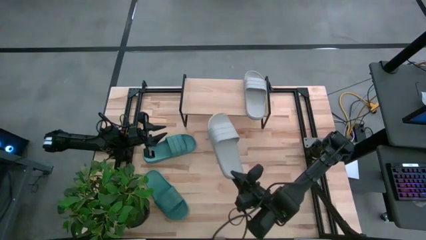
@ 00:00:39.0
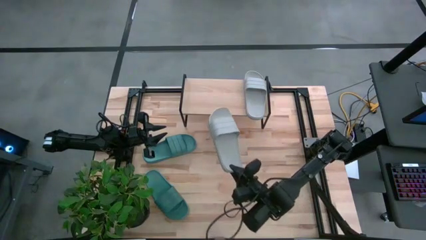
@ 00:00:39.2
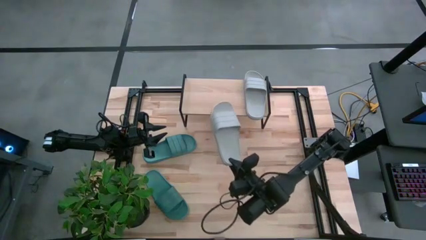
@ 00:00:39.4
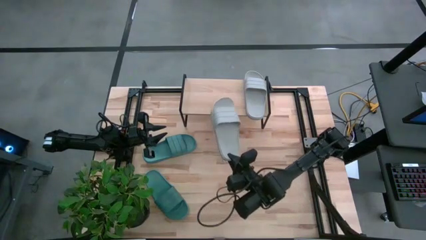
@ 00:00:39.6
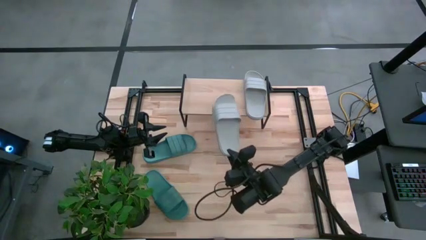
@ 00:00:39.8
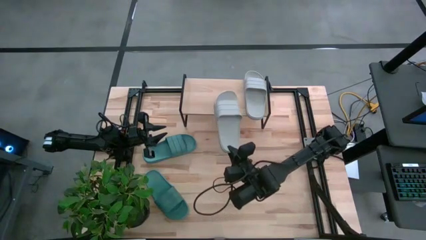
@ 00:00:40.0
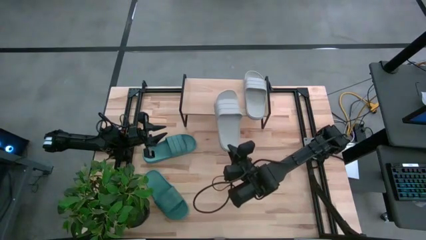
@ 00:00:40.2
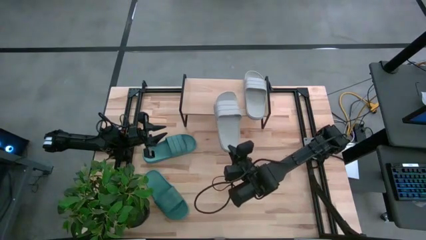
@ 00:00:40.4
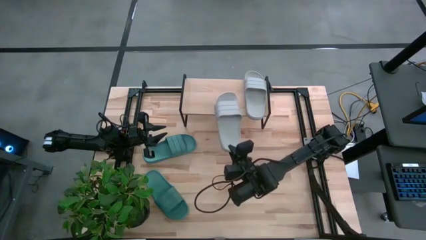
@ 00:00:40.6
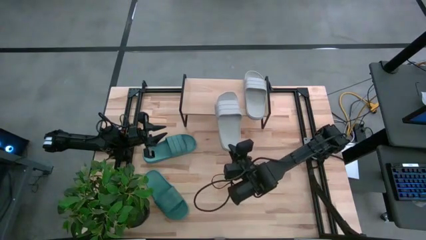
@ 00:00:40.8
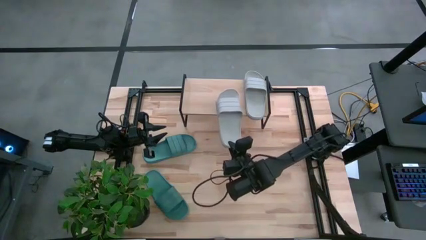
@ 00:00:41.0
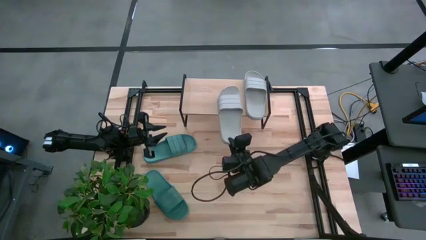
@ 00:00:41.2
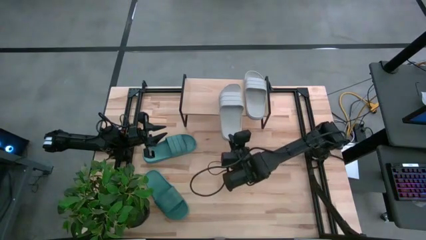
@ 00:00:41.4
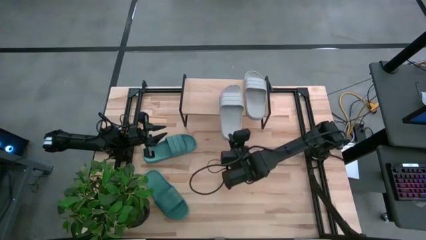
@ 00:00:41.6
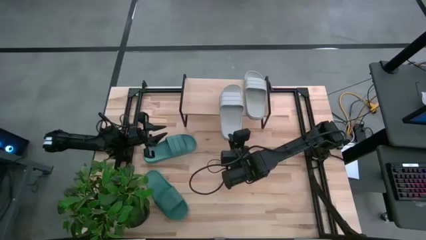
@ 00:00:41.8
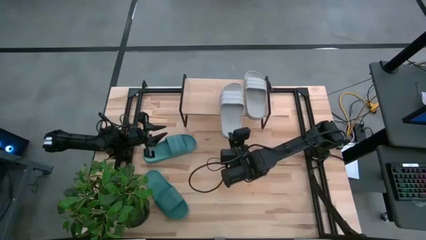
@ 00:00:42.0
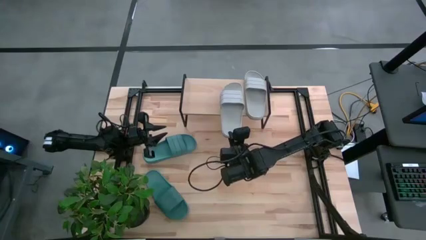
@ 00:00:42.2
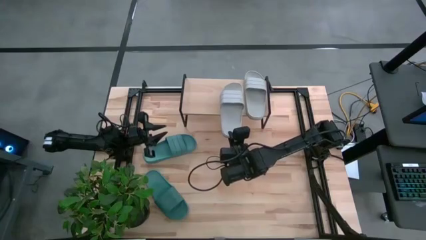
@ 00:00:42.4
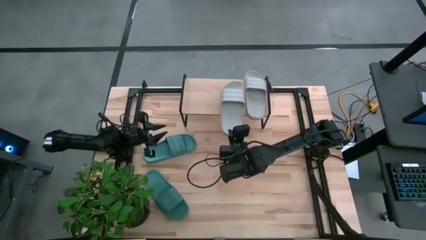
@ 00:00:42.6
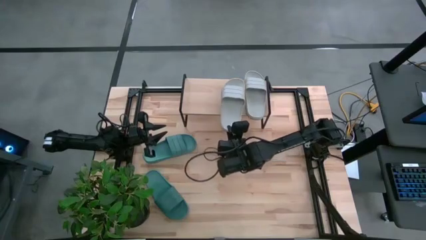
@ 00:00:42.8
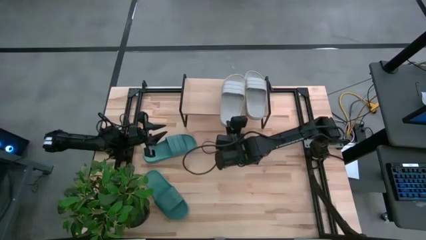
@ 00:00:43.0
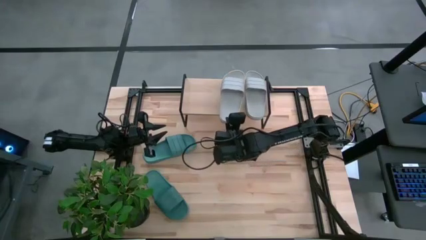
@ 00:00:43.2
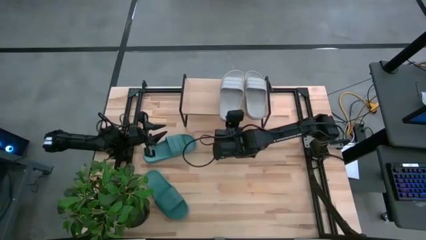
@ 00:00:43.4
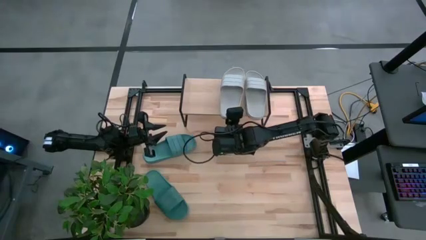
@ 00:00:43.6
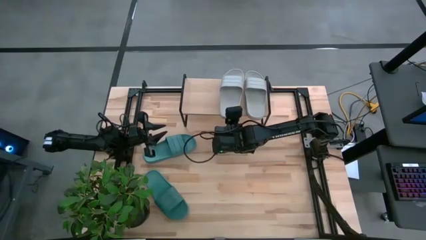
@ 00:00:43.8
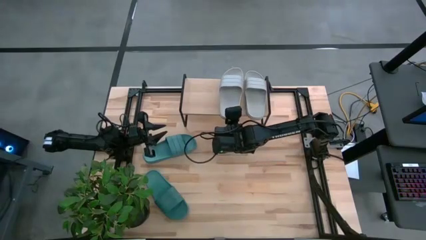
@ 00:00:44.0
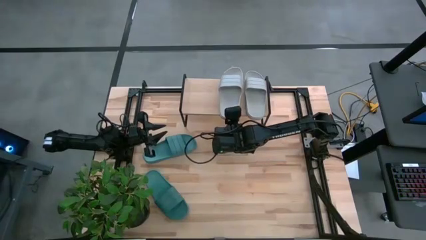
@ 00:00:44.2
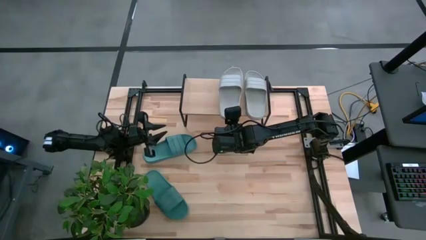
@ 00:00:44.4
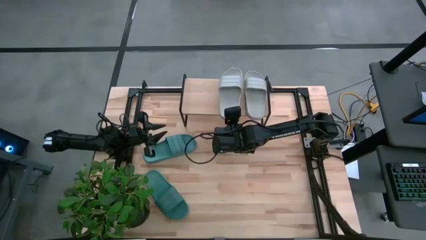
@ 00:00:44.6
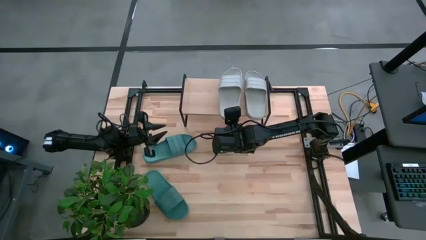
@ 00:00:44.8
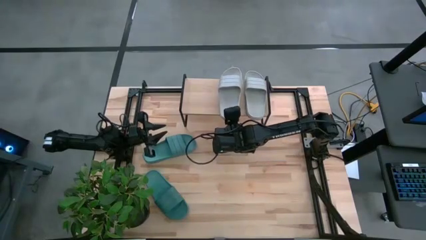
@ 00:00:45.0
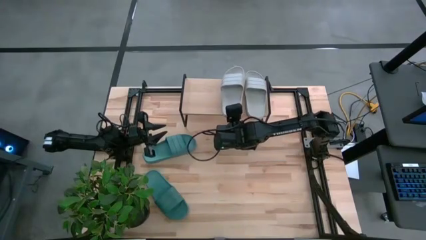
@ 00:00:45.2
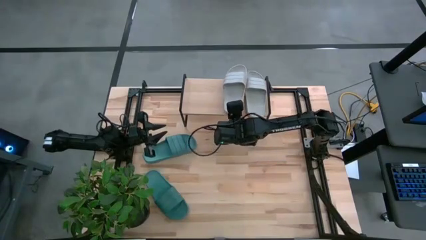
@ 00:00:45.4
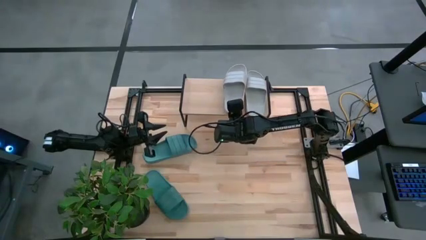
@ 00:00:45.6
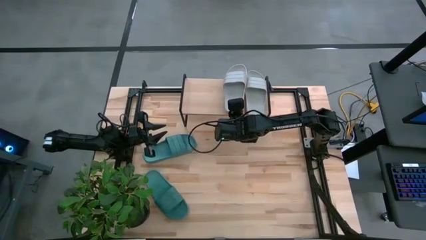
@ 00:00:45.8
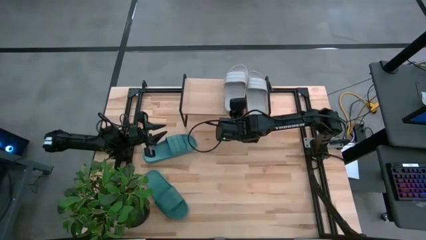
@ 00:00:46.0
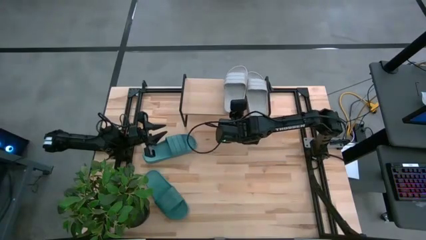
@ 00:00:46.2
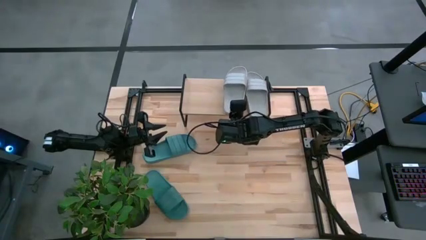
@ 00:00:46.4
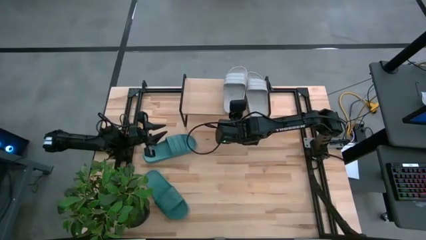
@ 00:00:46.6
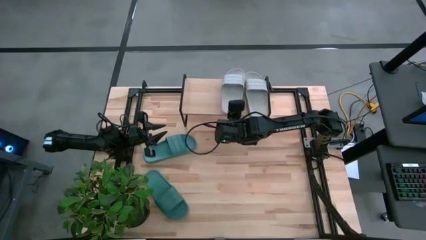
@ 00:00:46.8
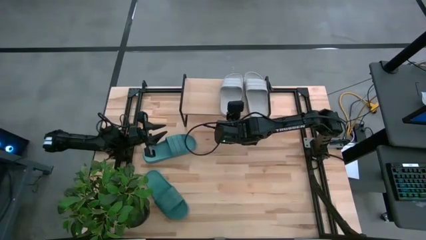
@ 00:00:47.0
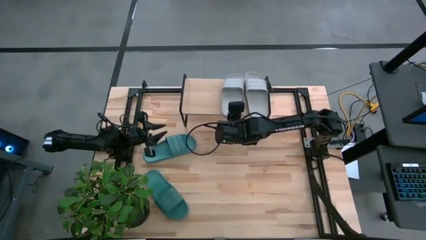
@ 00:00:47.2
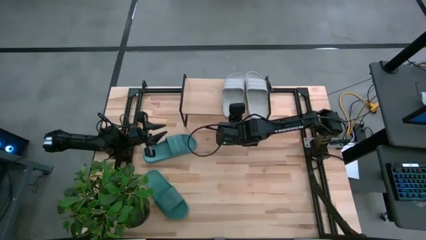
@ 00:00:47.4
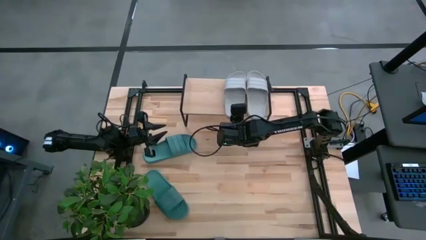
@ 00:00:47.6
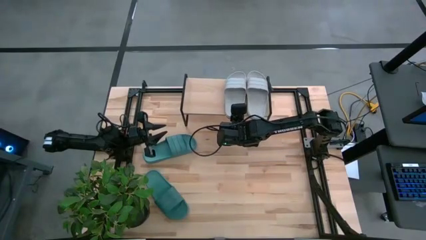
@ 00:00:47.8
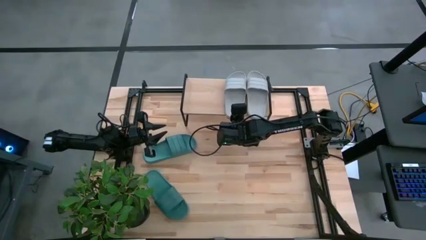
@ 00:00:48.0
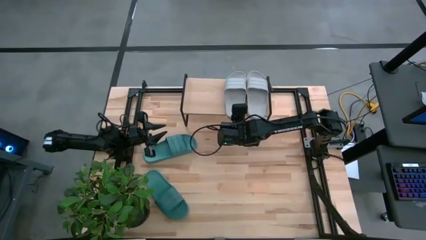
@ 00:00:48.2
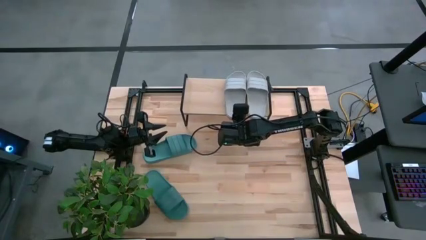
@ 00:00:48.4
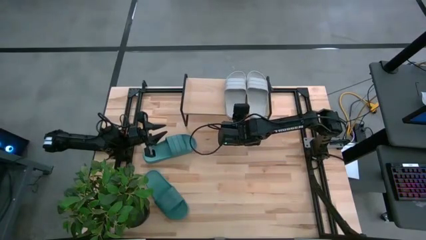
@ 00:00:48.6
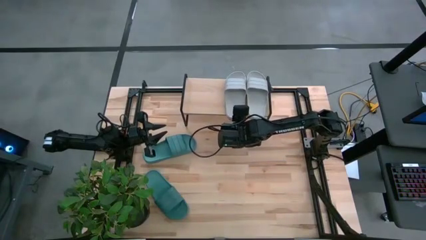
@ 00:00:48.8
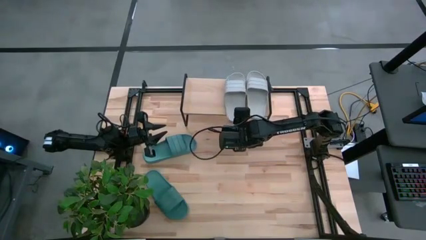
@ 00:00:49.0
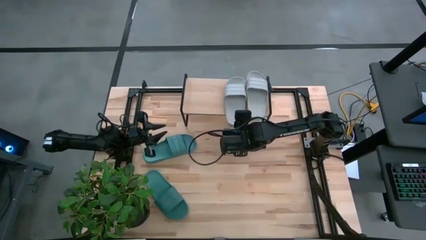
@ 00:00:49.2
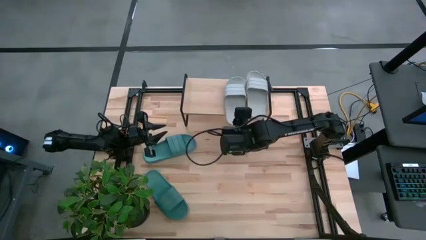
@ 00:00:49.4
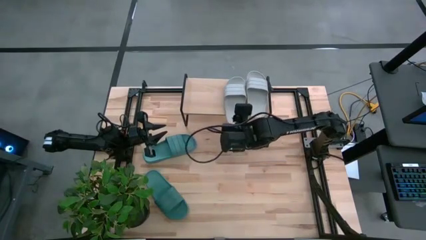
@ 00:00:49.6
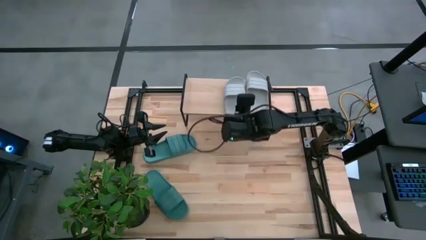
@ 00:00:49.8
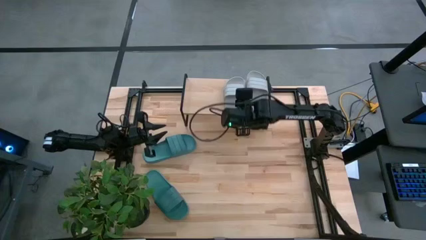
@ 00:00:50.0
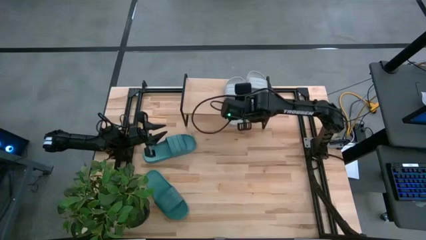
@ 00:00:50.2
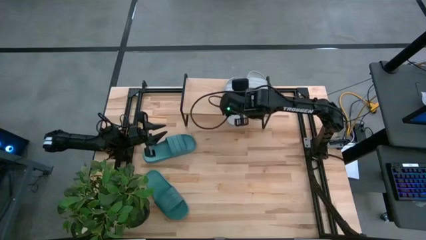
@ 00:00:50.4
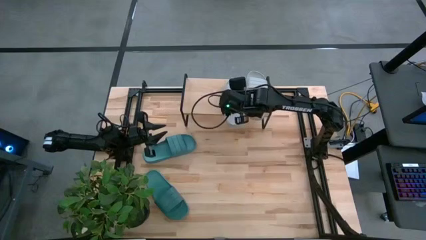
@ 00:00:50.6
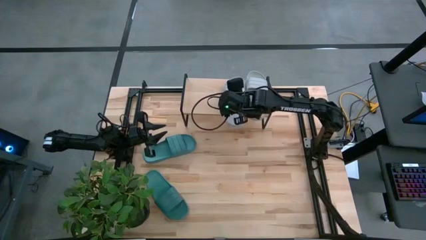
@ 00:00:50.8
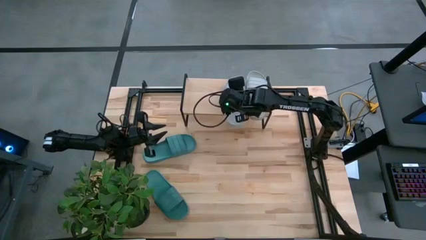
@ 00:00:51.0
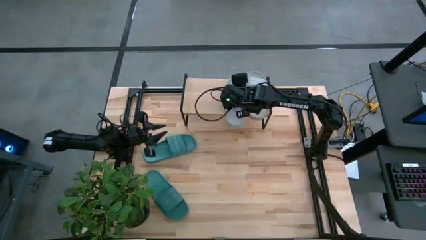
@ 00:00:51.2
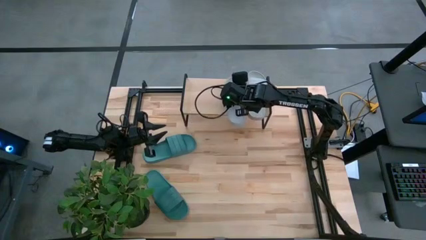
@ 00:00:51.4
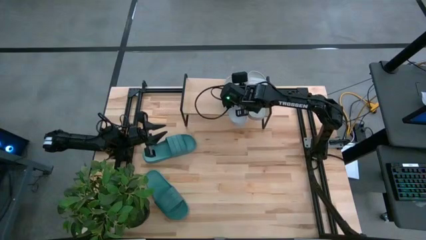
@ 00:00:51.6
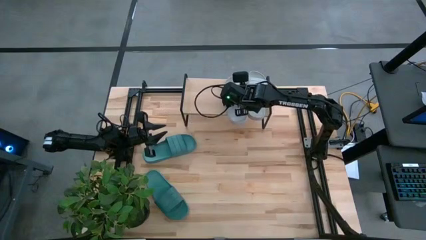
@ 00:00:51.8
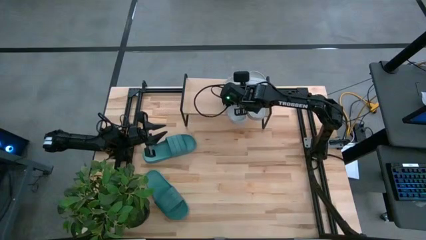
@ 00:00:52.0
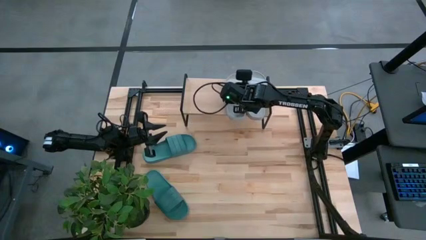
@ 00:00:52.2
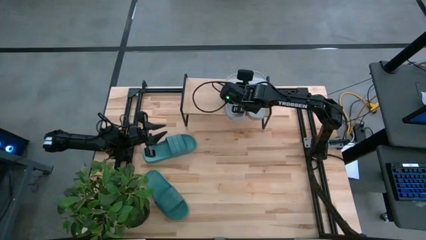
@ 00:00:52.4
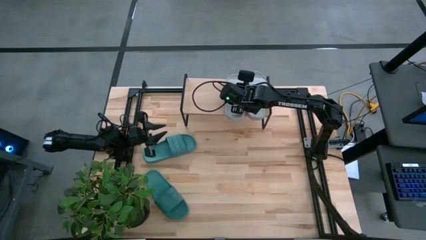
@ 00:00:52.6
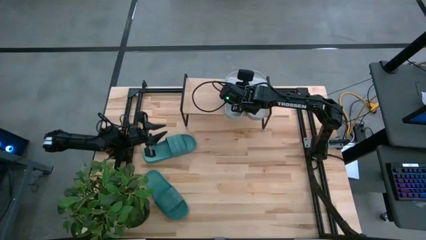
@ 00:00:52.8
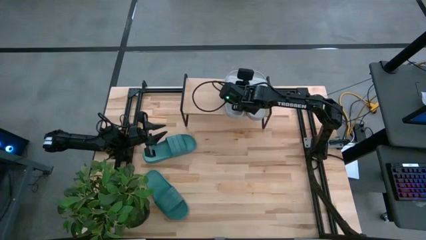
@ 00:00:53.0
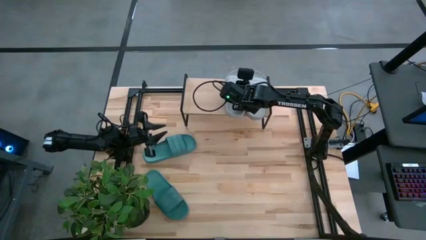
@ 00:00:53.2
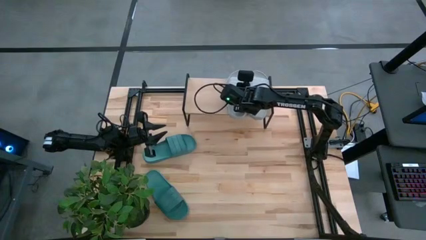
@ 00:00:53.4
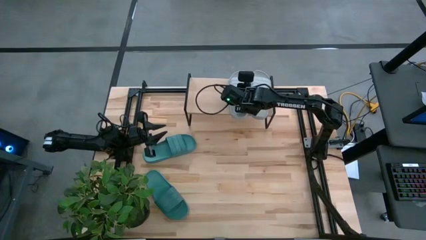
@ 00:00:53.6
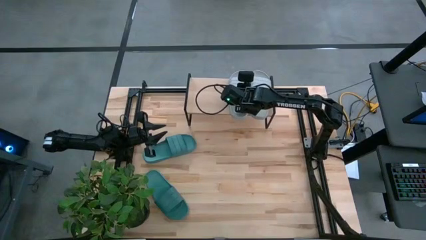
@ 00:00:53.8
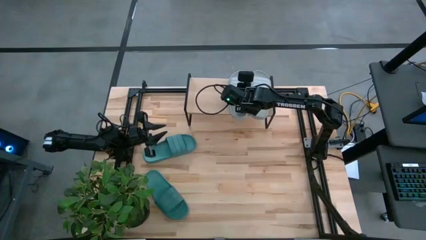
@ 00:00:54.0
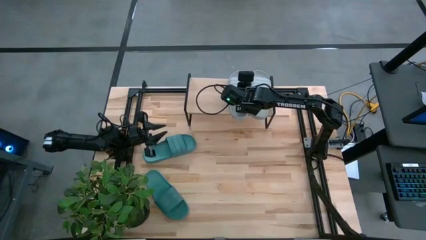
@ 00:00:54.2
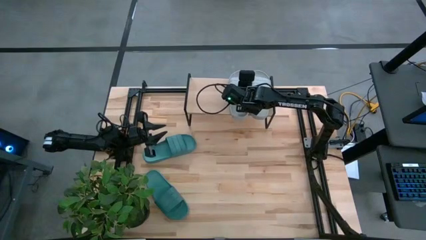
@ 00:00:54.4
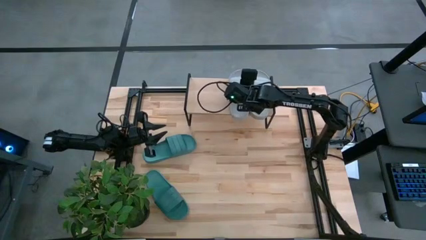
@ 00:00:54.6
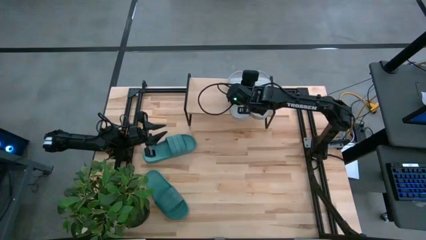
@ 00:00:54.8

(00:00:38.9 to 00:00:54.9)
Task: Pick and place slides into the shelf
Put the gray slipper on the shelf
